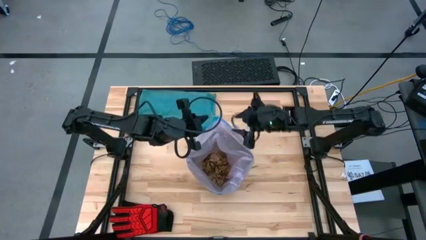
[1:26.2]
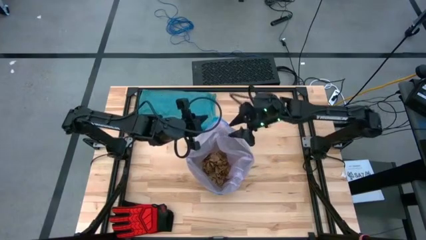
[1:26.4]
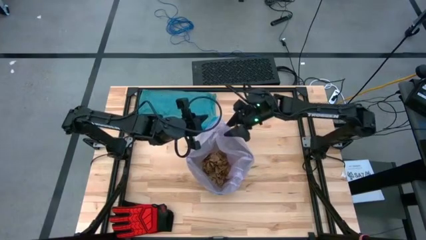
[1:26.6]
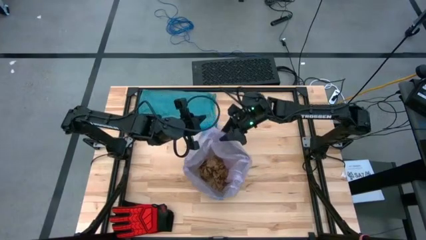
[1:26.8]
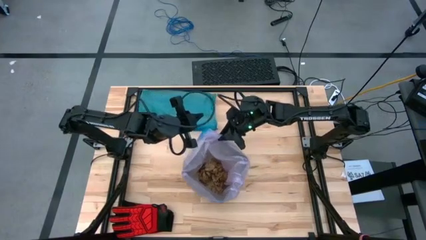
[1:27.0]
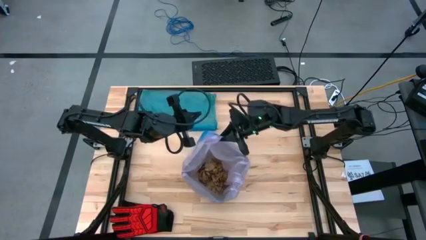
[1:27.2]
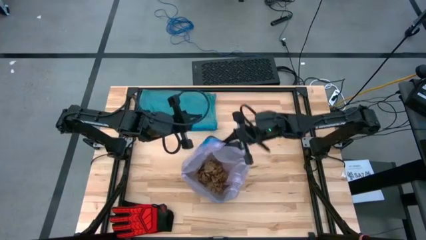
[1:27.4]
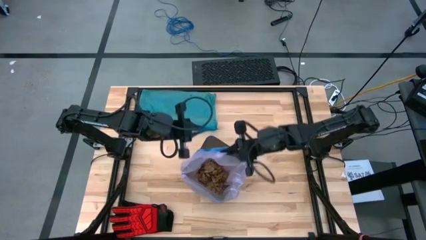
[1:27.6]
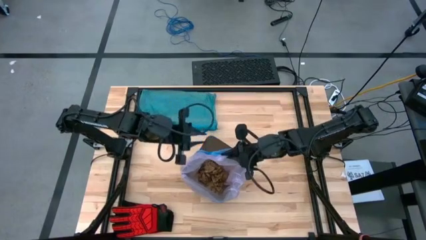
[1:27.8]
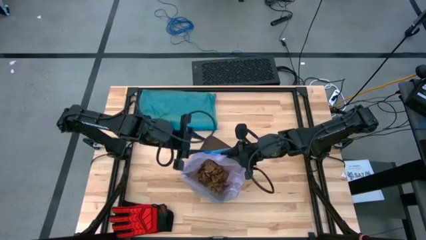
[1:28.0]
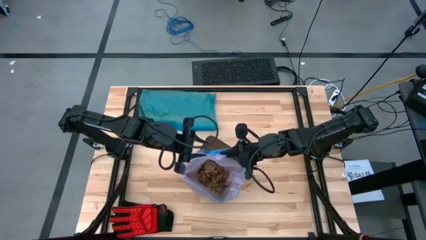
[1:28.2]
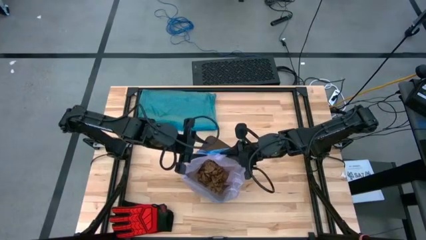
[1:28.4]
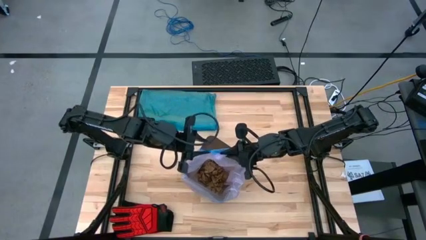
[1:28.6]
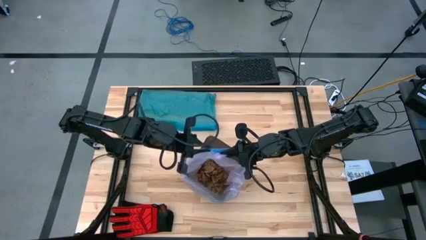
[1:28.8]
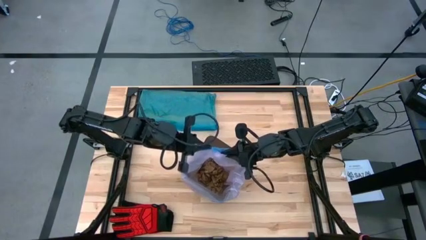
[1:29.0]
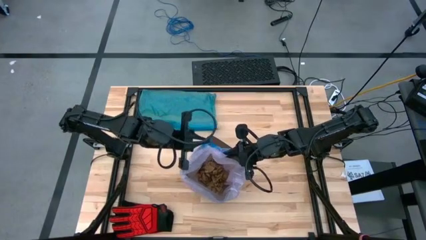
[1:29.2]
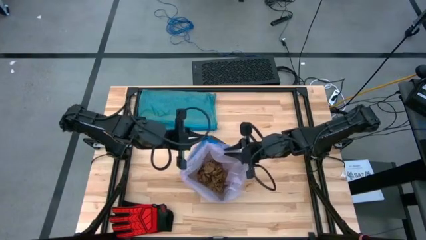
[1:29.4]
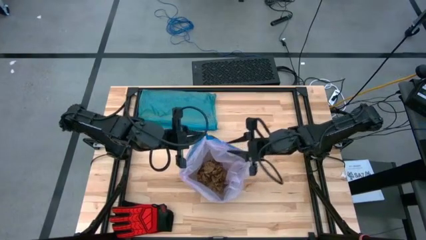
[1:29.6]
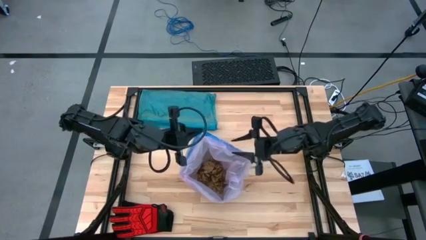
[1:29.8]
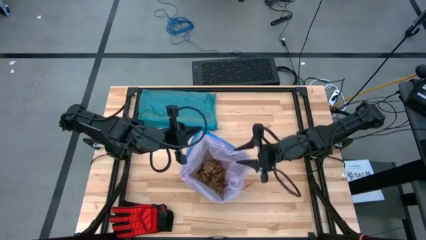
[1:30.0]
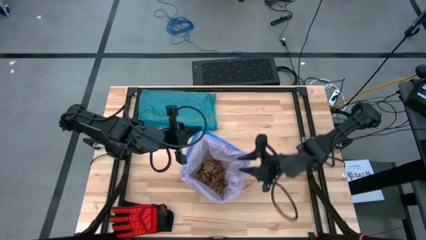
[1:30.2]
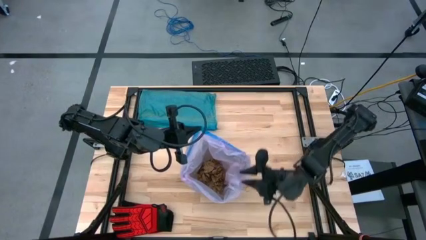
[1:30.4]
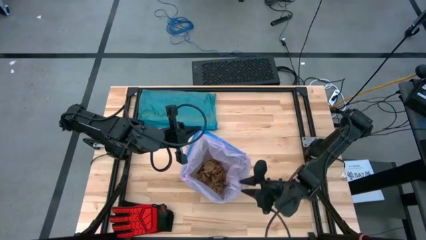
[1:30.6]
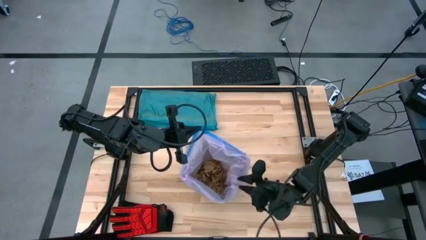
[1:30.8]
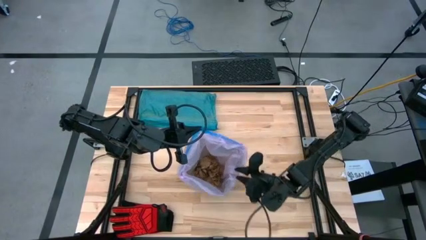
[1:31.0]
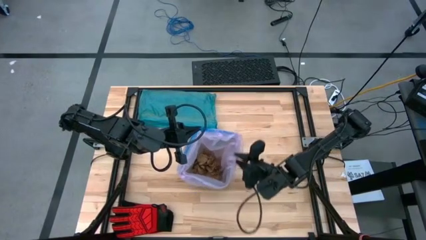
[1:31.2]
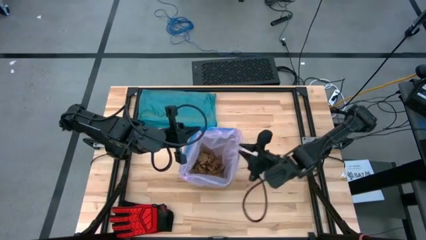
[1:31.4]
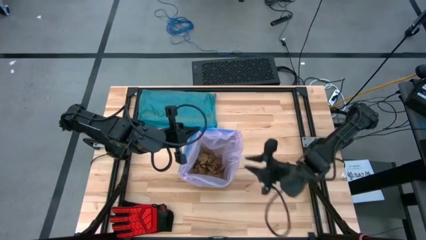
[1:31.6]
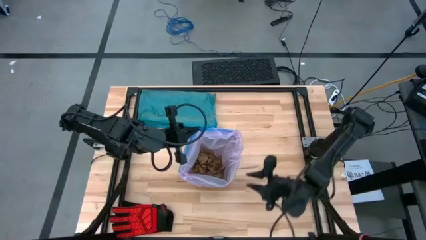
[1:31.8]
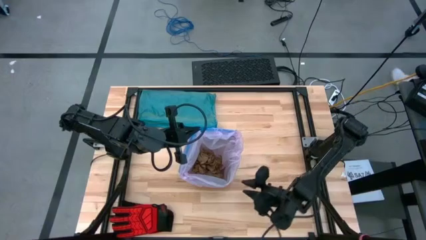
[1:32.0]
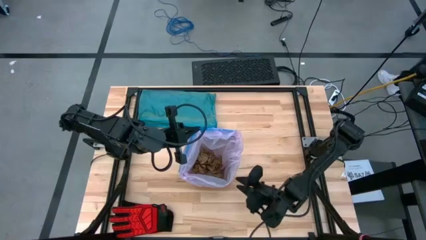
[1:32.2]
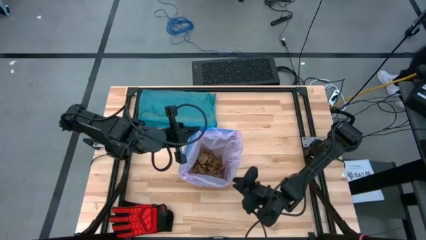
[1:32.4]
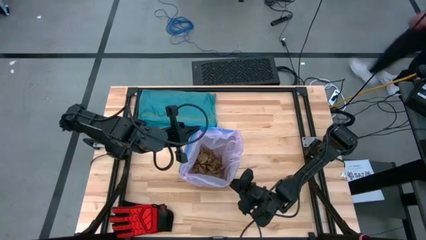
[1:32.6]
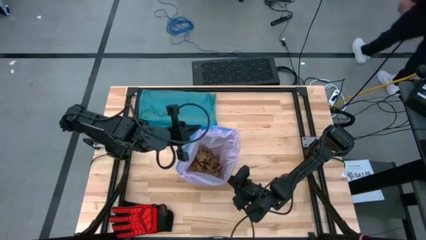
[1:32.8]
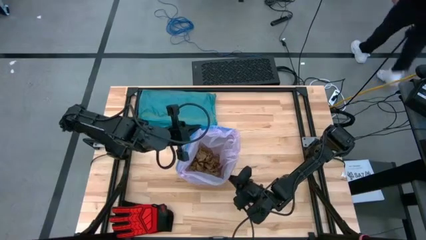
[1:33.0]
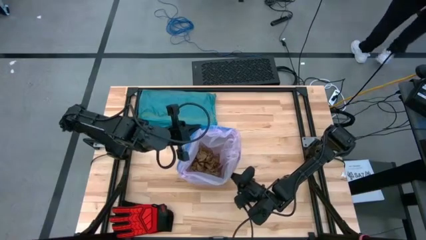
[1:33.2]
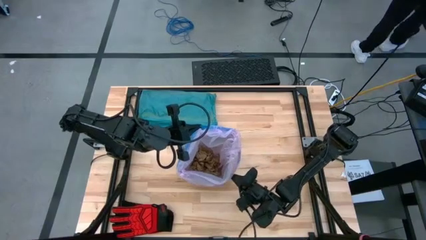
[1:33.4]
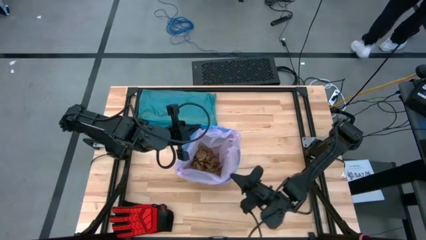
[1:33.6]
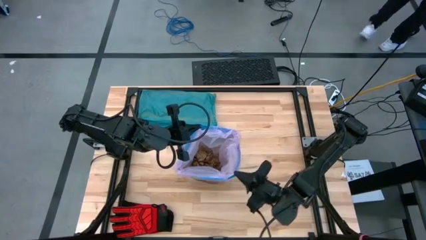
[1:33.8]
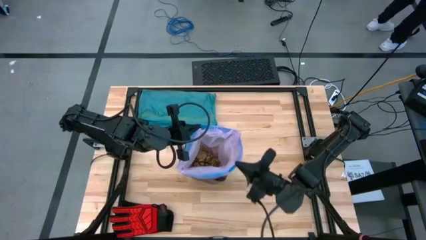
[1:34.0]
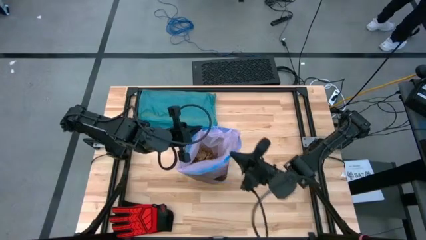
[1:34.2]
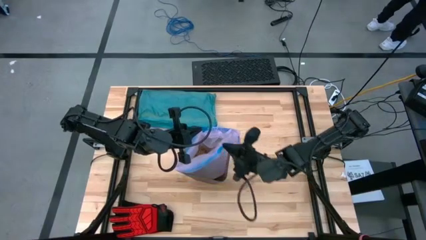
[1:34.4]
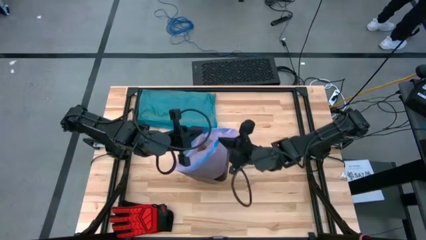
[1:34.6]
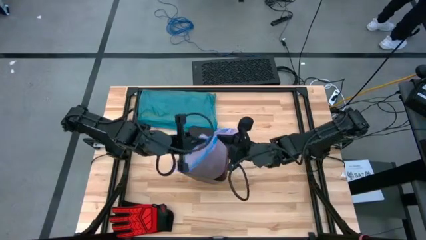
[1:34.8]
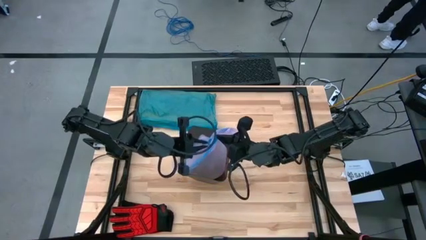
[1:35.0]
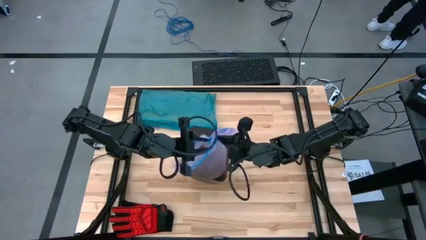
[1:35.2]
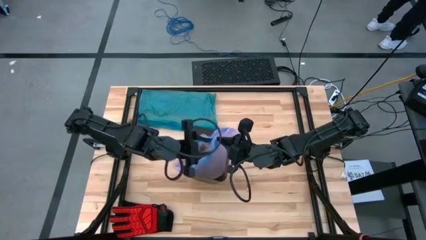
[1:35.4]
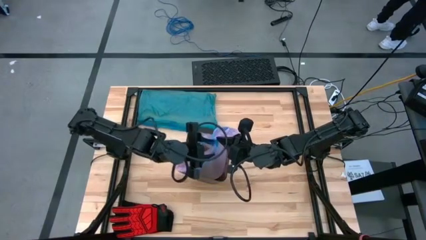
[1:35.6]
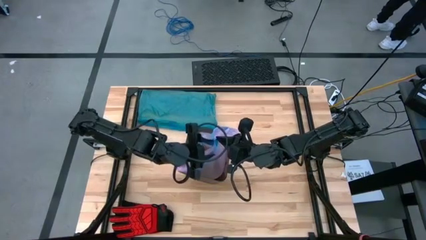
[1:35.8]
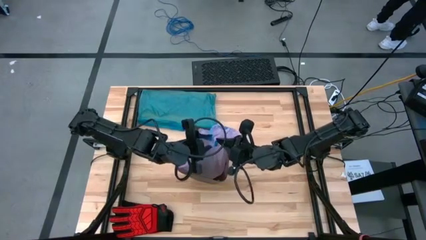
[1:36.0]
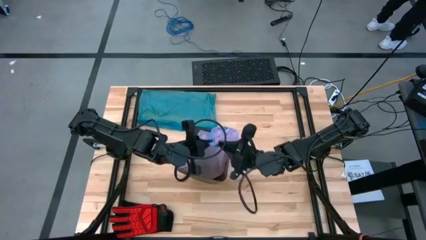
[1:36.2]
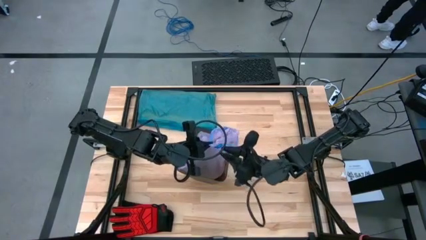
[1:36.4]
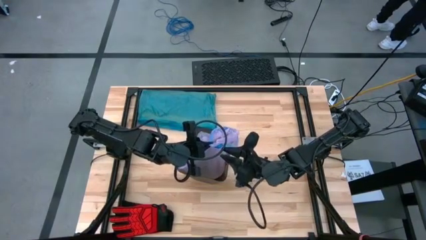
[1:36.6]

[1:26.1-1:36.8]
Task: place trash/remove bag and relplace
Remove the trash bag from the trash bin and put it on the top right of the table

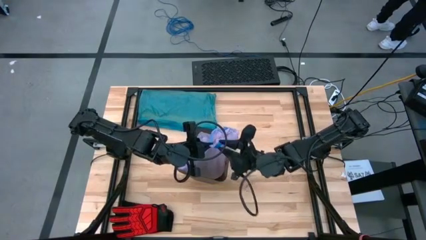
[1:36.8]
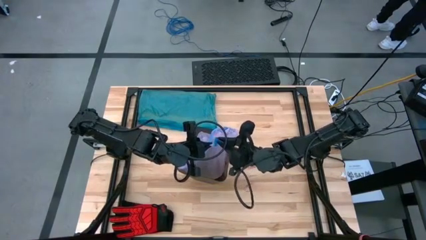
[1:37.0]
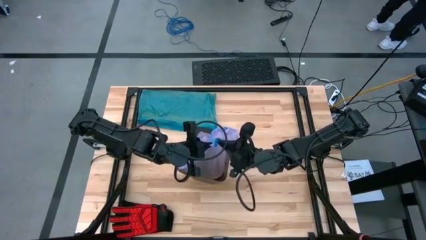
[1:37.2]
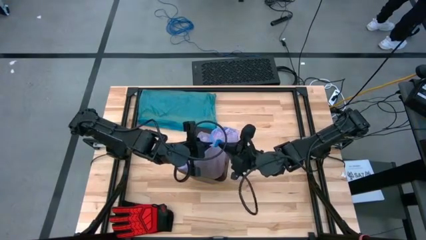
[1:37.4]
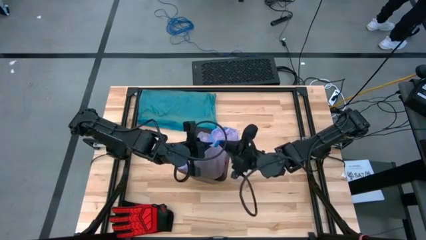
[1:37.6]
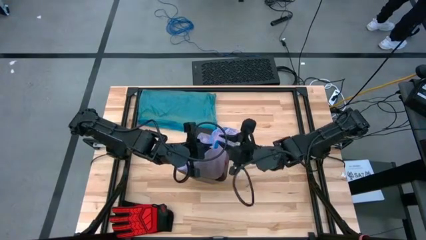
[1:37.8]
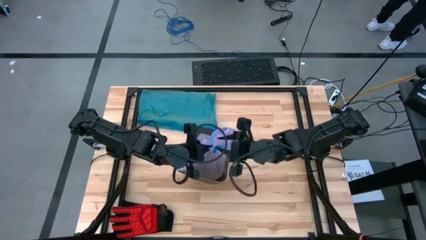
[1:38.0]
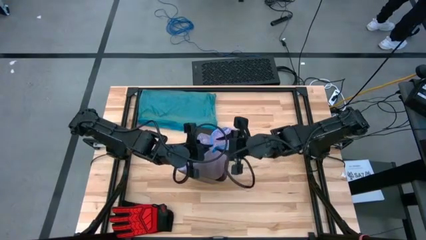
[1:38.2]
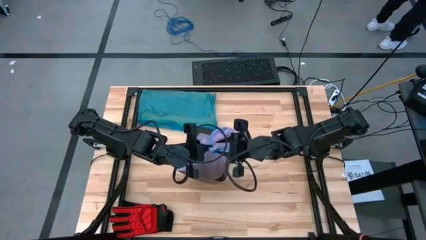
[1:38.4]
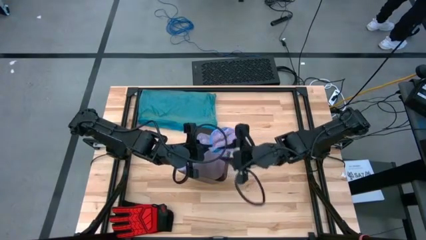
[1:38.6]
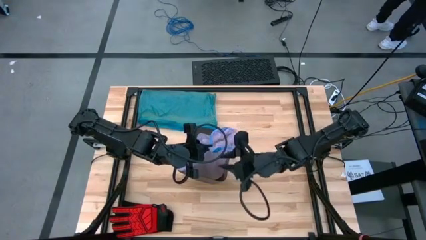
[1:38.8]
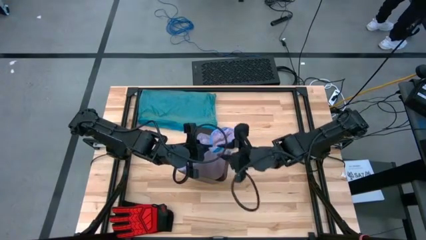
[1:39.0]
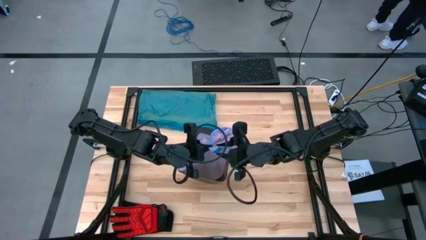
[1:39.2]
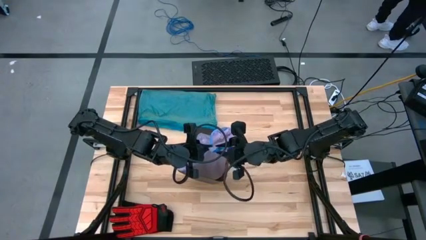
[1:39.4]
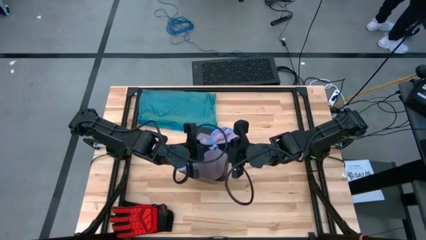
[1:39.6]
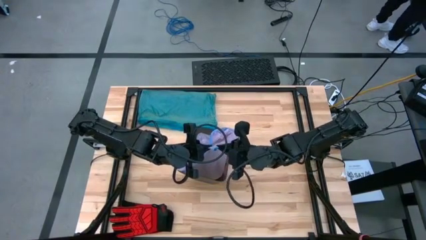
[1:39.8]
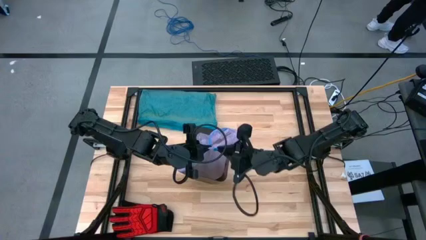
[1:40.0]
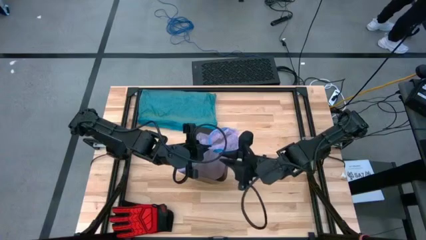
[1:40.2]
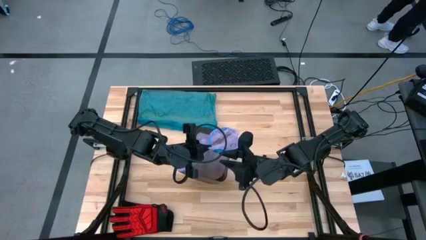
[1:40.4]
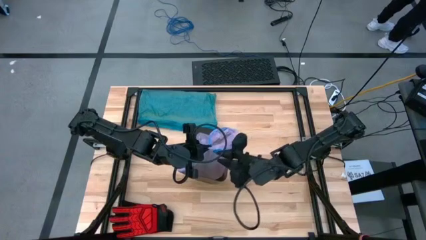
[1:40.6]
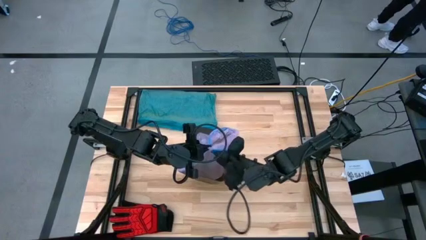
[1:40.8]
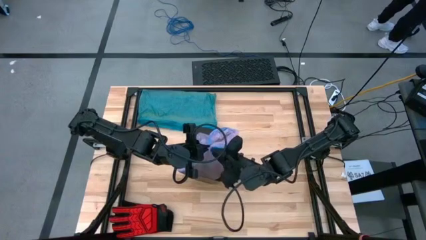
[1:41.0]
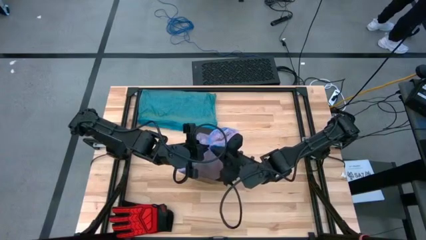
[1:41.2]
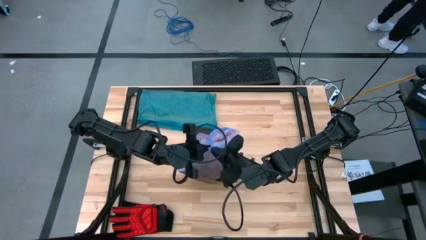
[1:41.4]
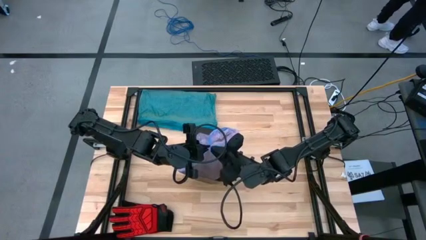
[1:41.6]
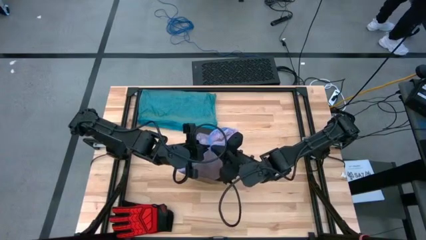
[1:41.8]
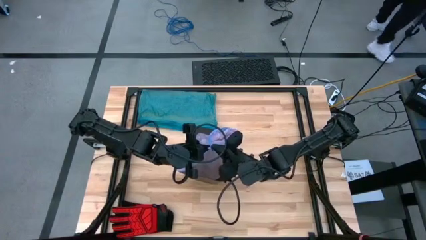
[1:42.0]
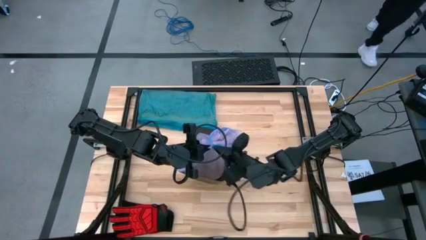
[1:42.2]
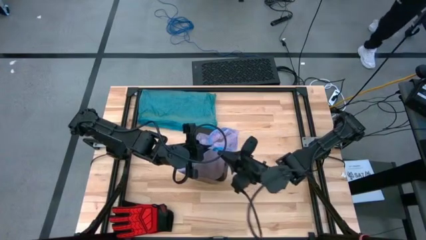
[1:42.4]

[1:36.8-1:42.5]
Remove the trash bag from the trash bin and put it on the top right of the table
